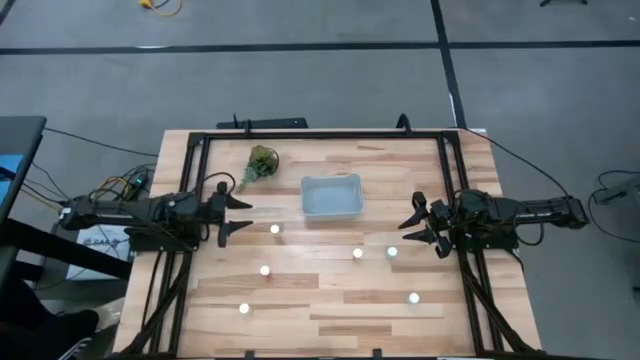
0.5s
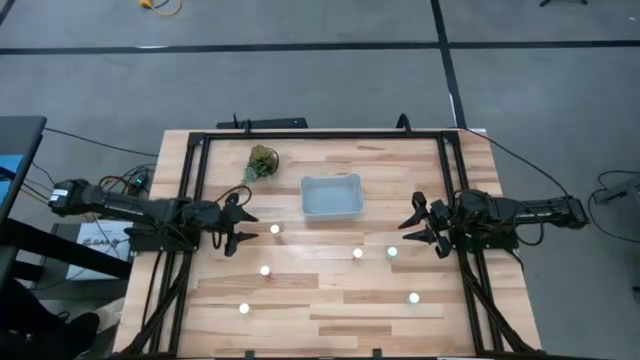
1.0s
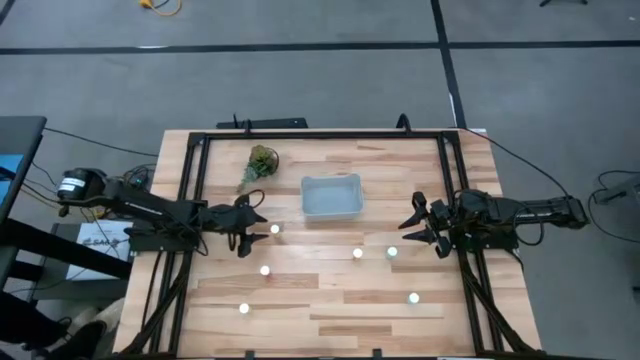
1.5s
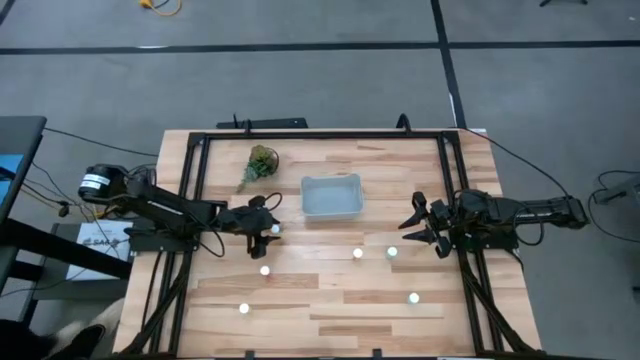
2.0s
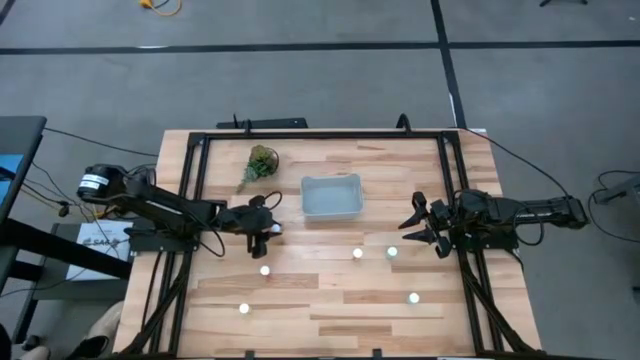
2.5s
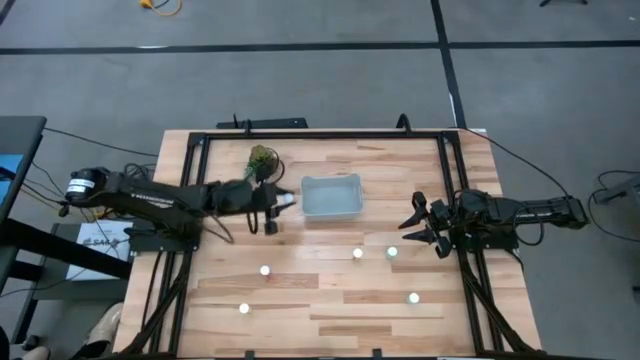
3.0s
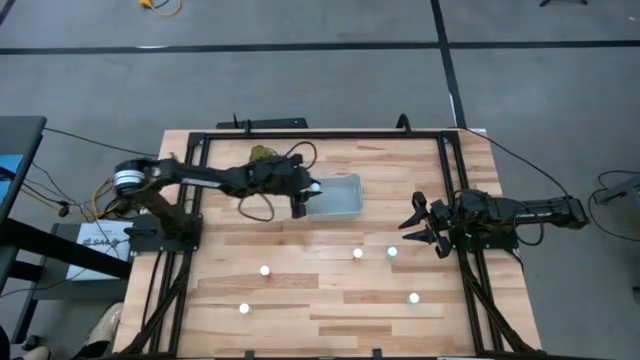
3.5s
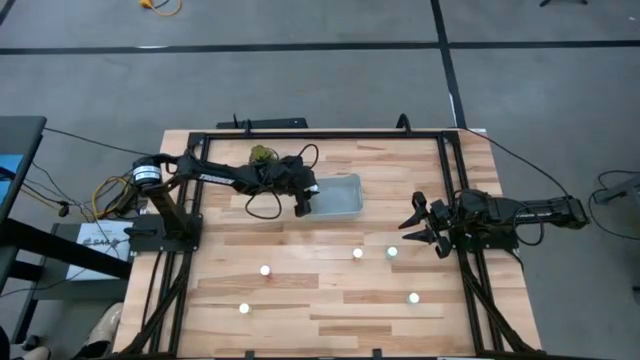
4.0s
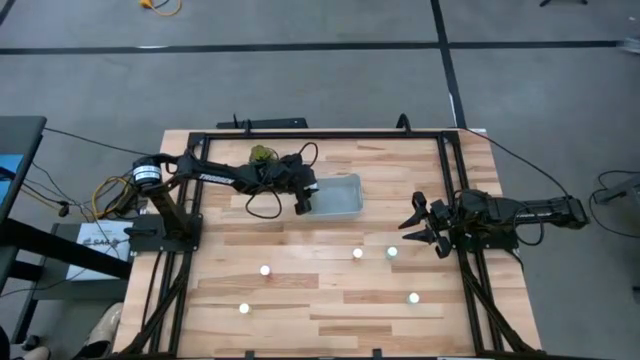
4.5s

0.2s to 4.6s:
Task: Pick and place pill bottles into a basket
Put the top yellow pill bottle into the gray bin

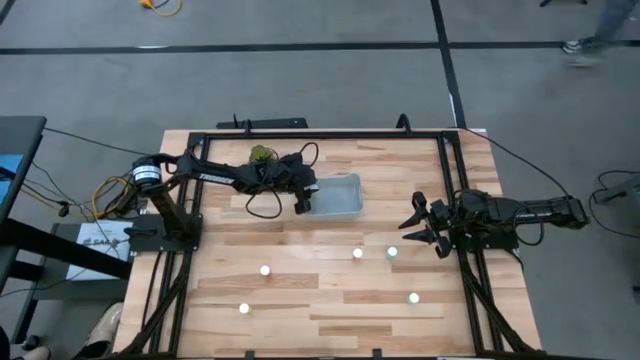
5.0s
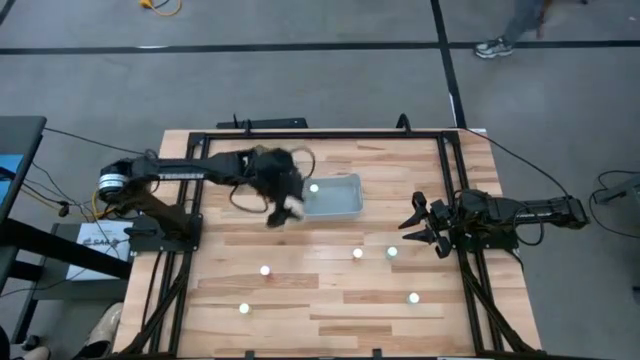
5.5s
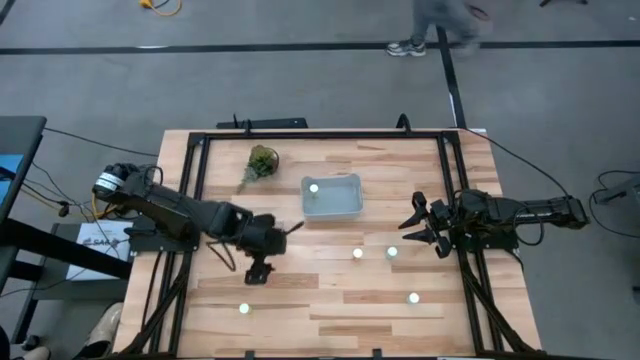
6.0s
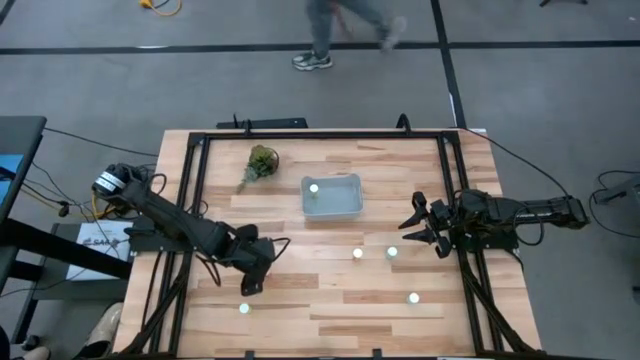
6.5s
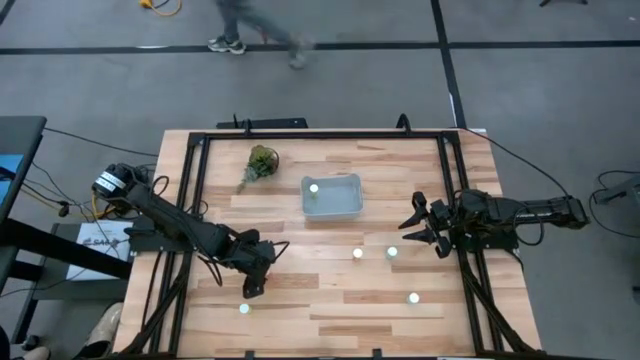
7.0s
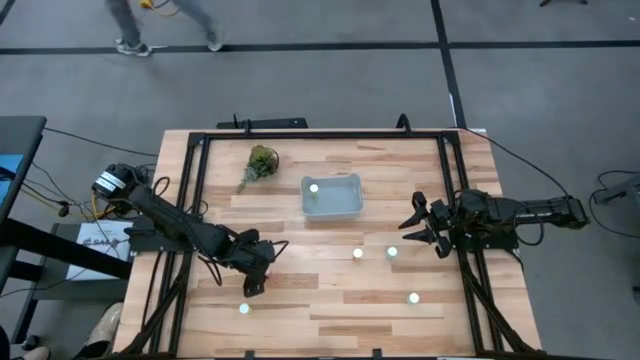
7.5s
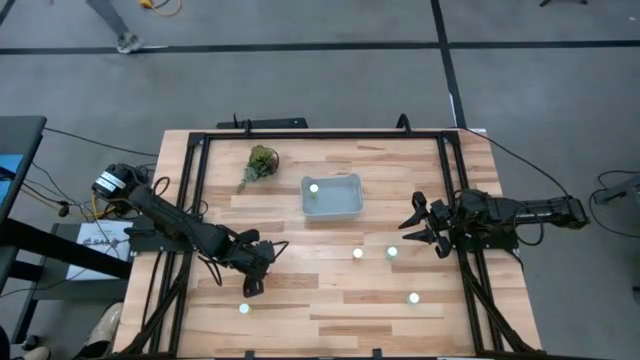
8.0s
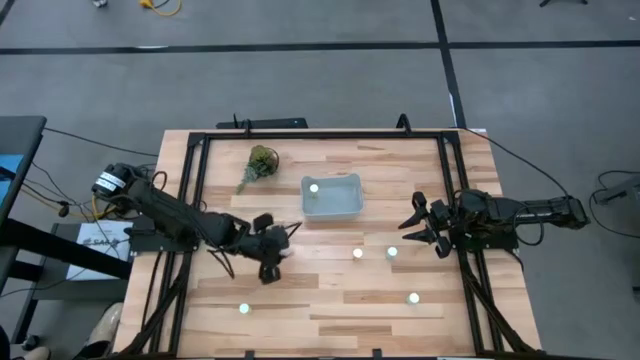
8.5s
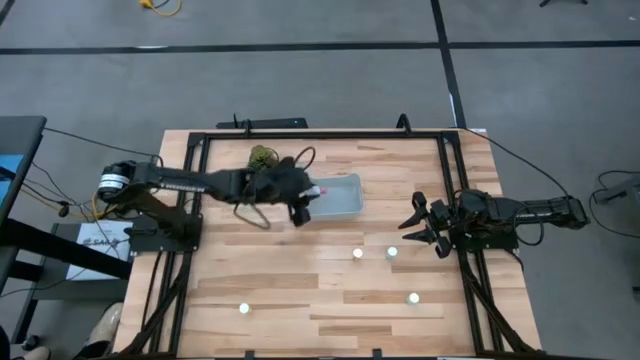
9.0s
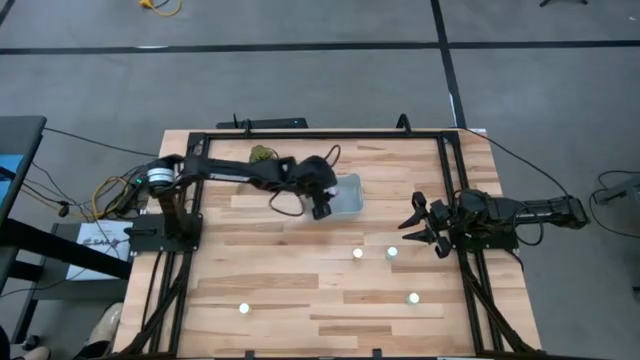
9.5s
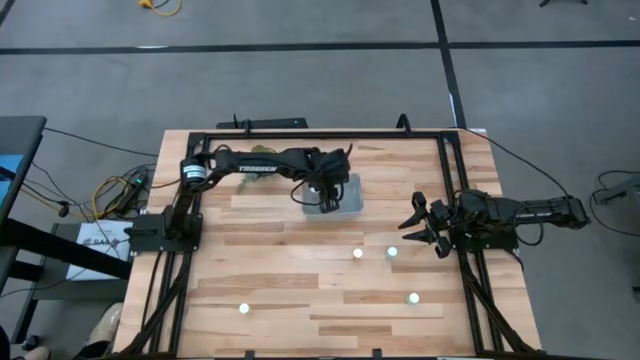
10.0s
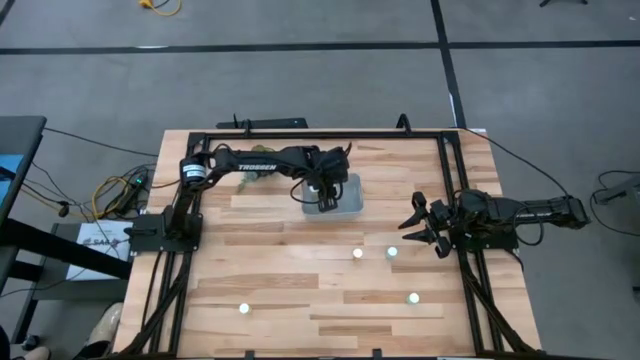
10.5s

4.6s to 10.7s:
Put the red pill bottle into the gray bin

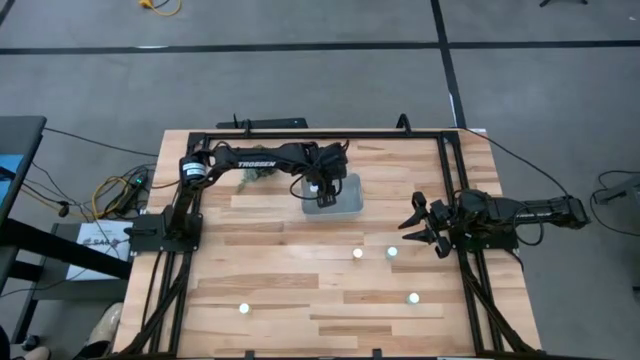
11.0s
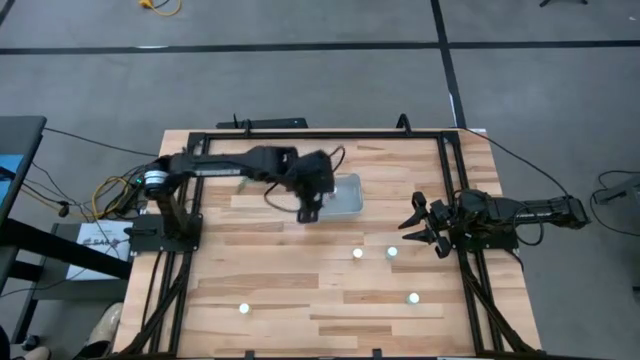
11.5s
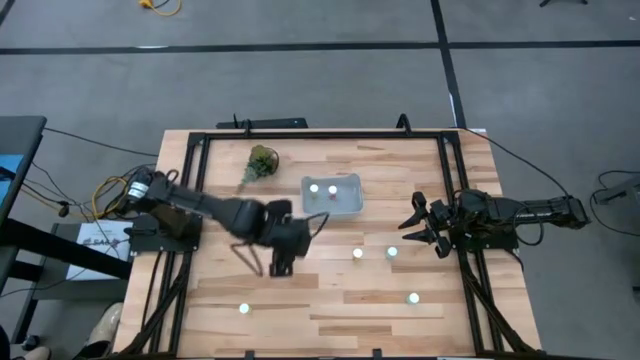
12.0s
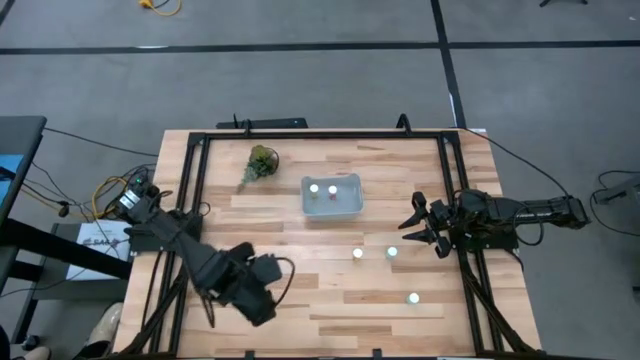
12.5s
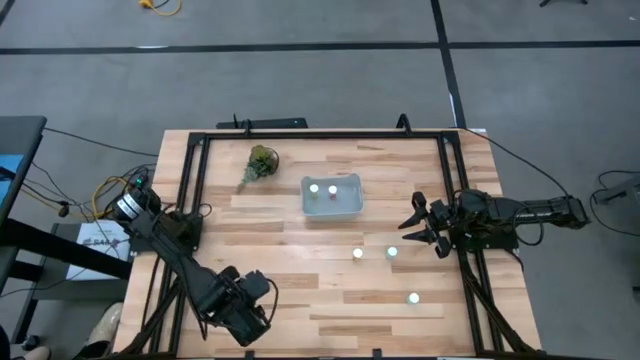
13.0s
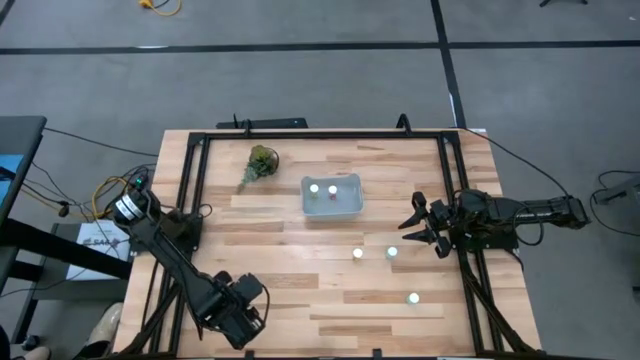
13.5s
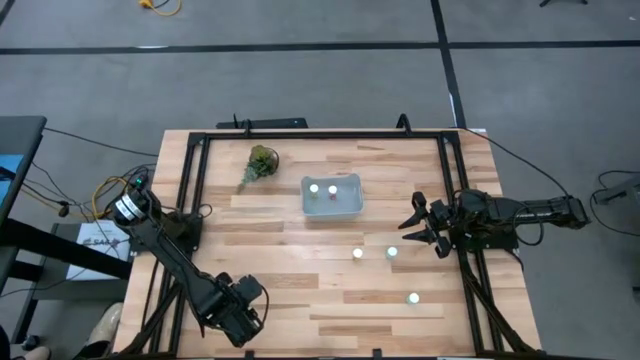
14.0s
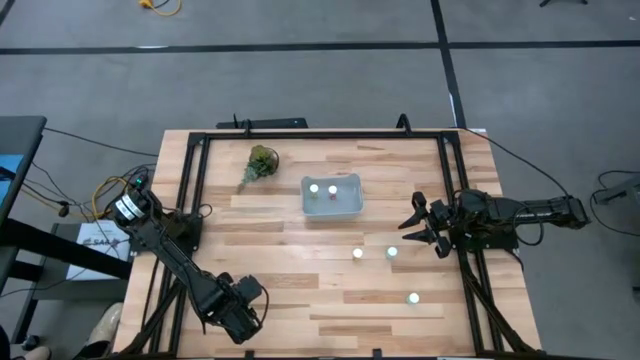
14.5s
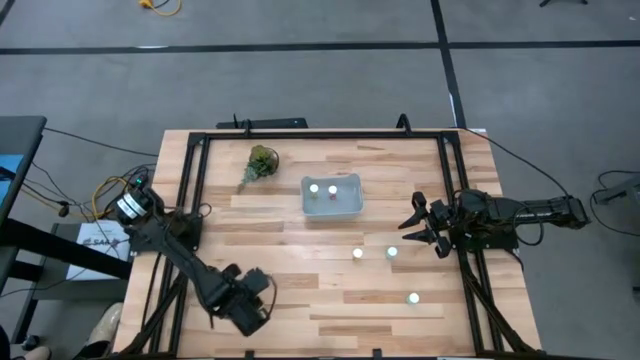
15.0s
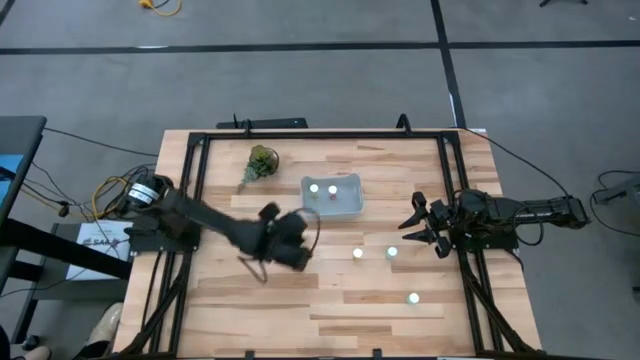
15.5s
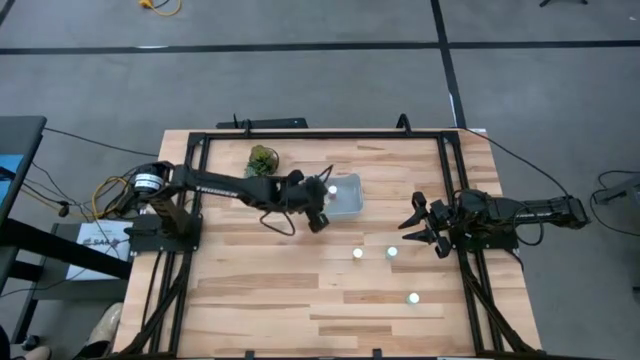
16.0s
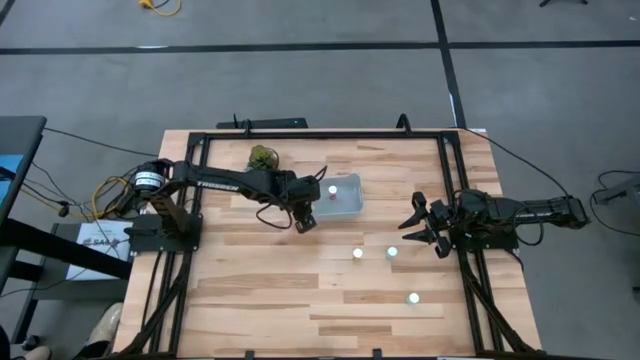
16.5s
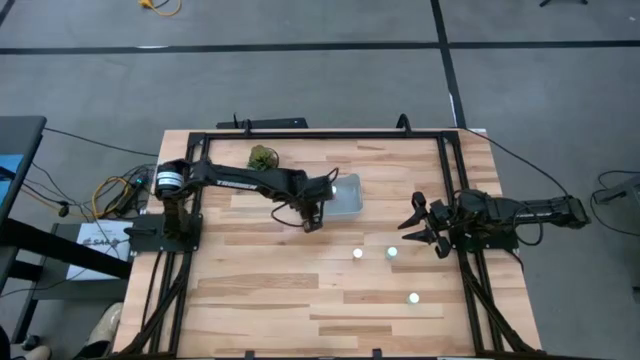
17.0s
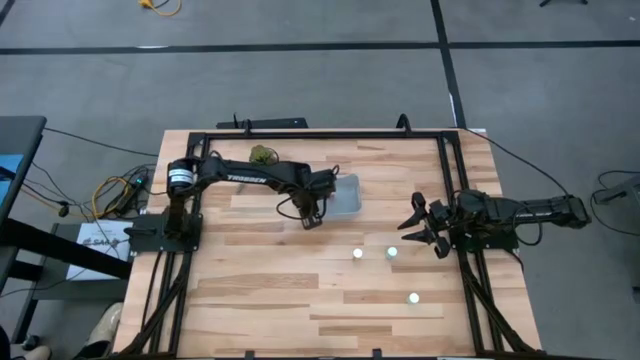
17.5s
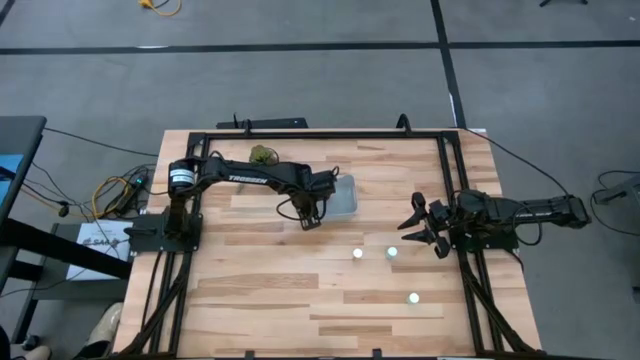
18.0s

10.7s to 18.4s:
Put the bottom yellow pill bottle into the gray bin

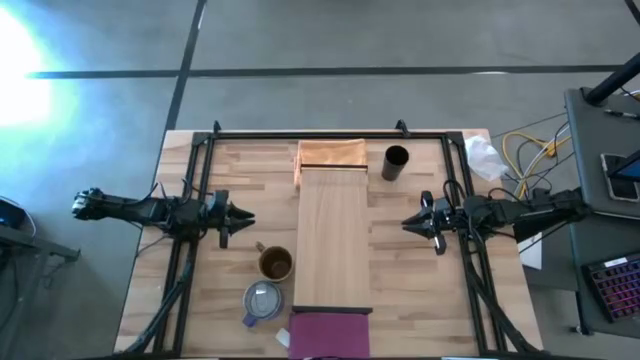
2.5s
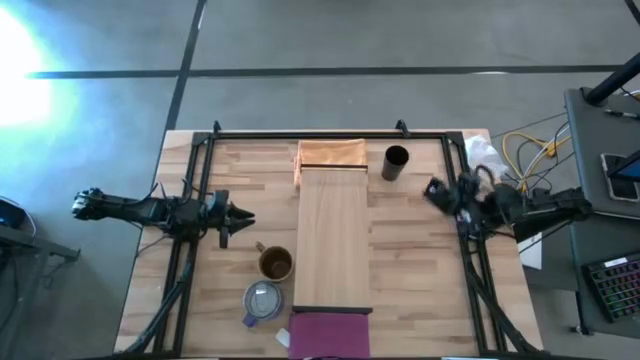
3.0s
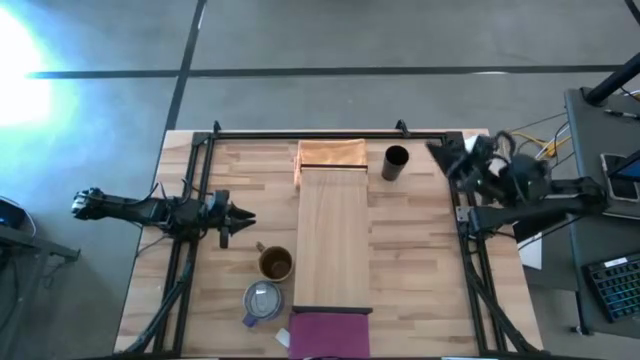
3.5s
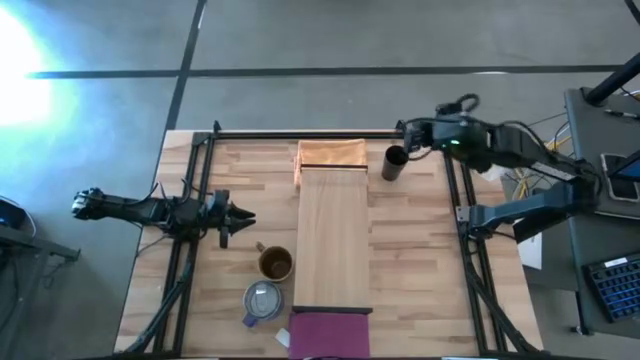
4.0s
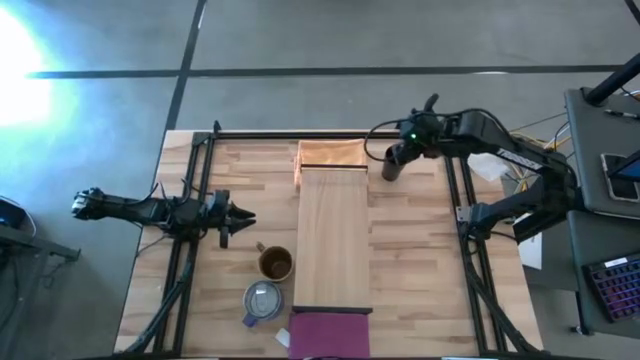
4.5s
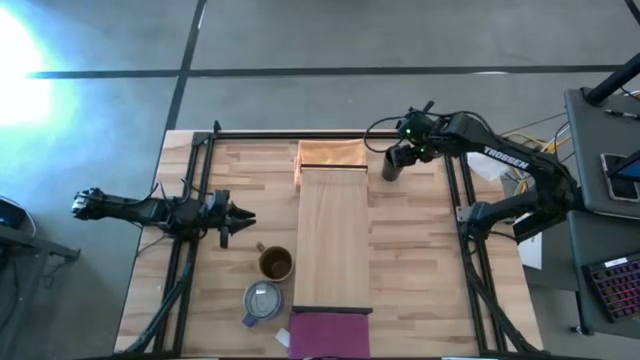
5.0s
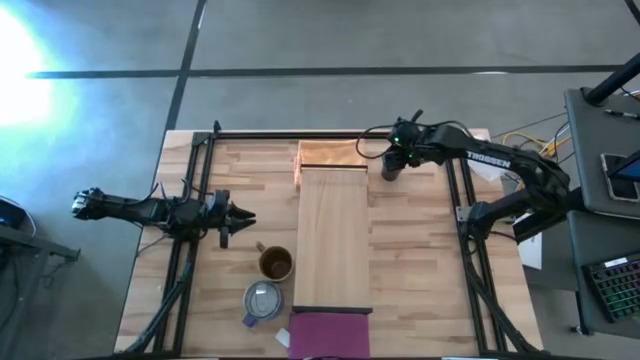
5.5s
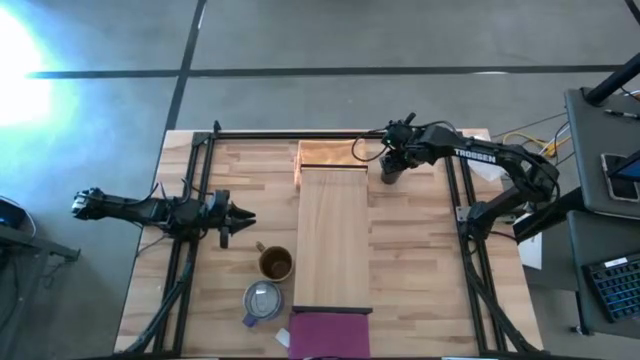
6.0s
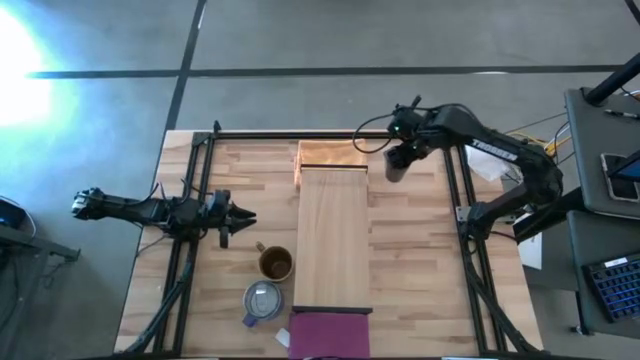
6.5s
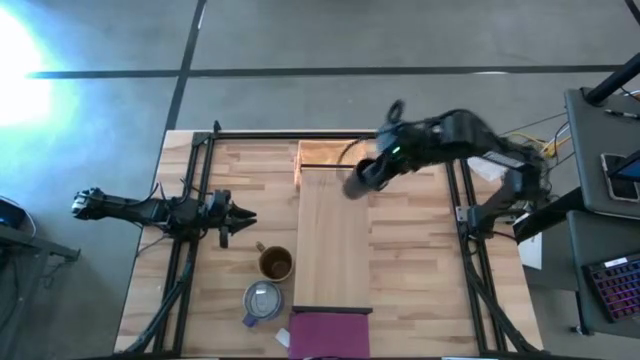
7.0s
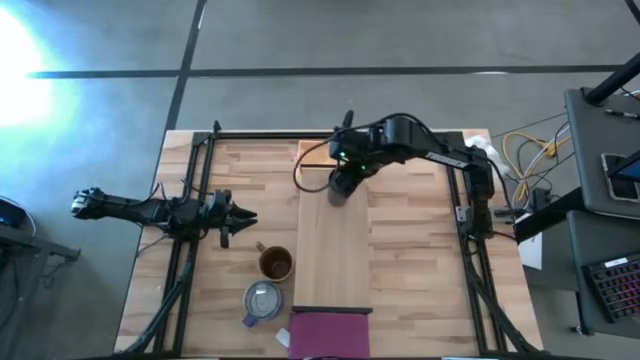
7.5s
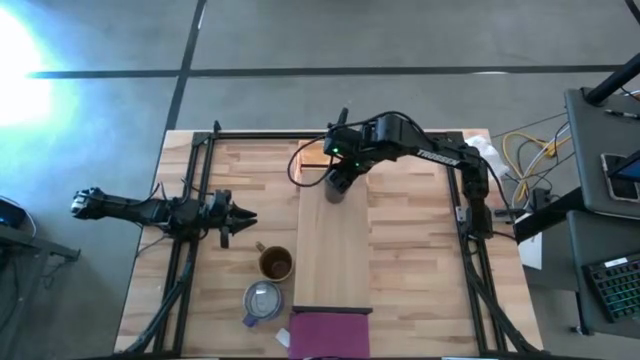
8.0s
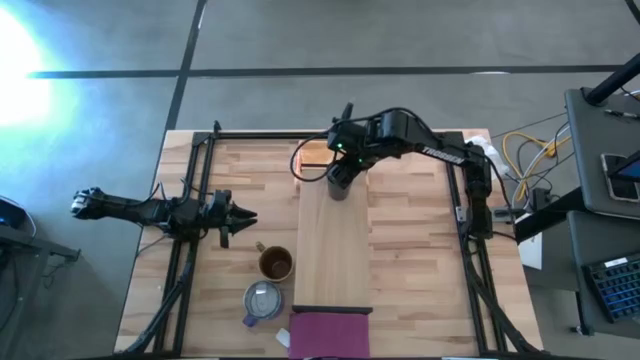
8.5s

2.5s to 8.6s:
Task: Stack small to large cups/mugs on shelf
Put the black cup on the shelf
